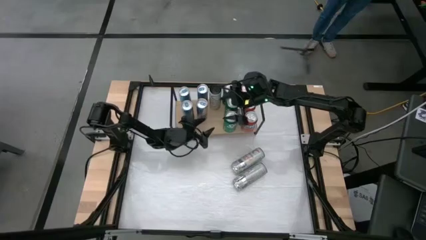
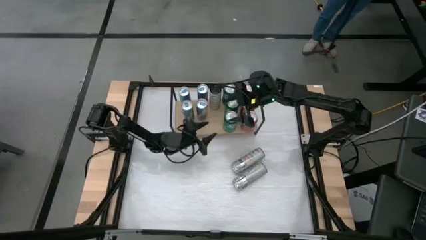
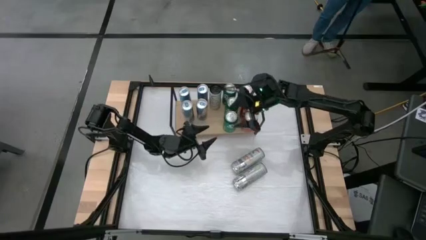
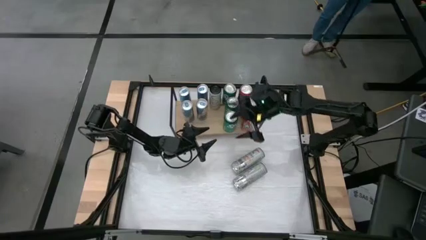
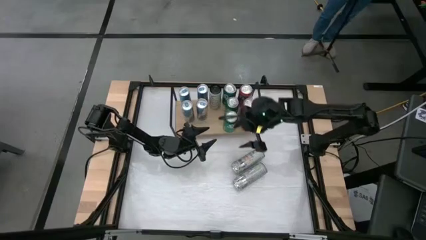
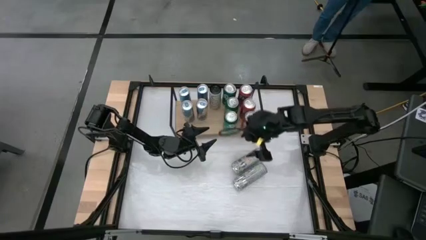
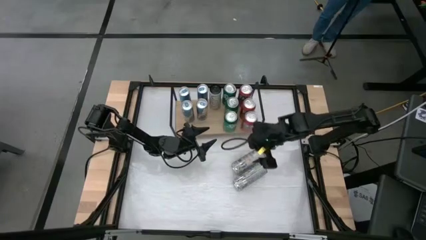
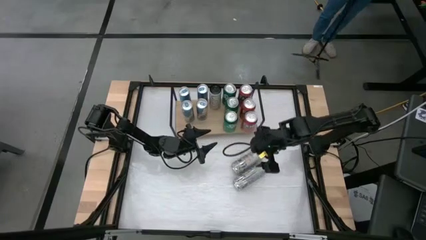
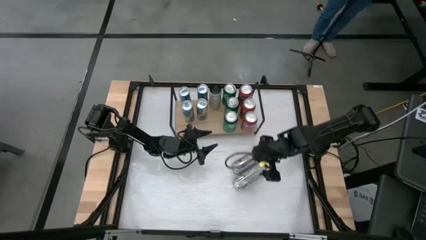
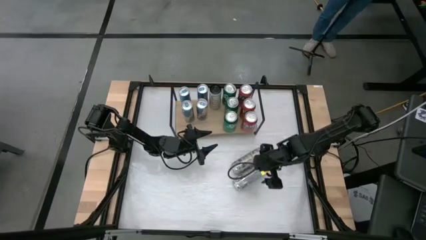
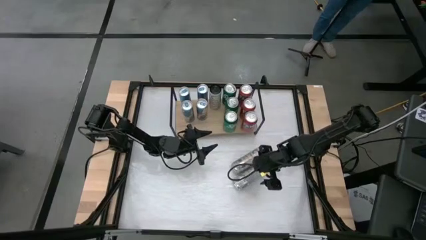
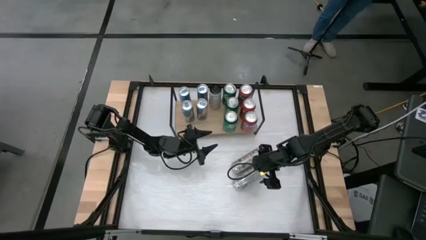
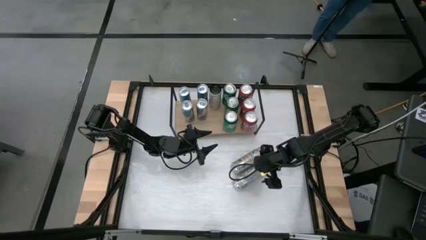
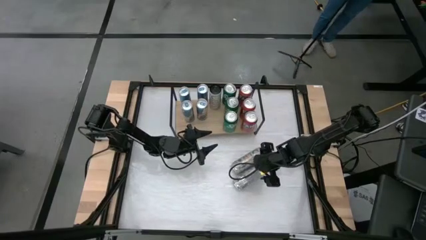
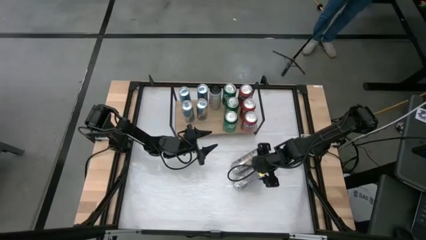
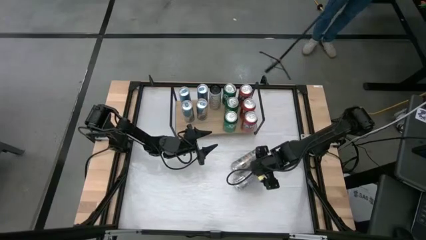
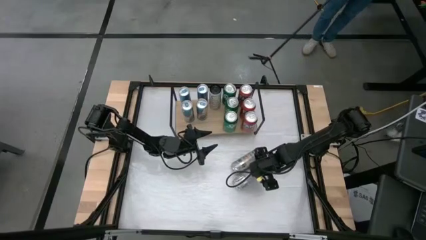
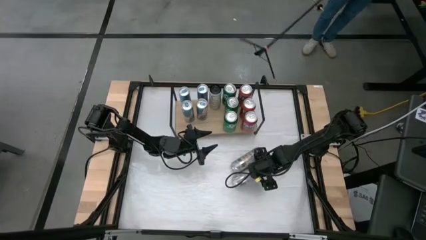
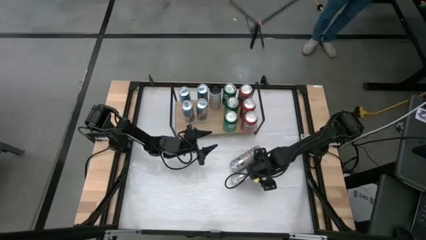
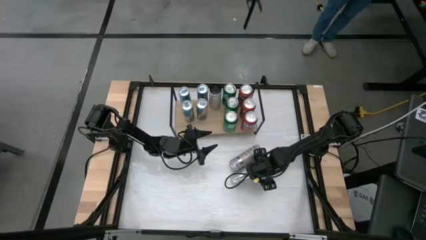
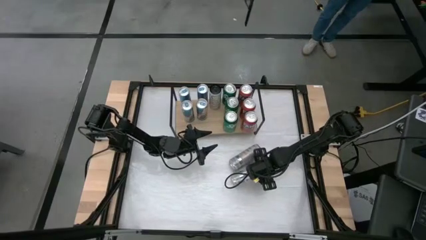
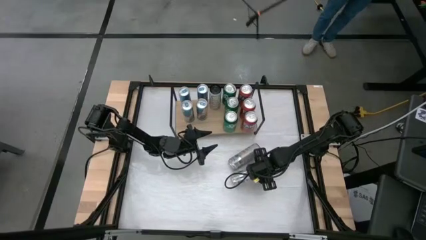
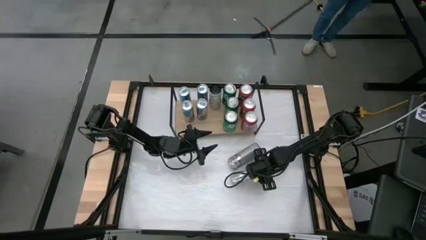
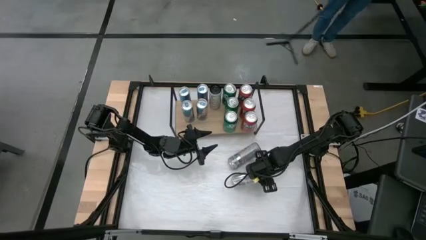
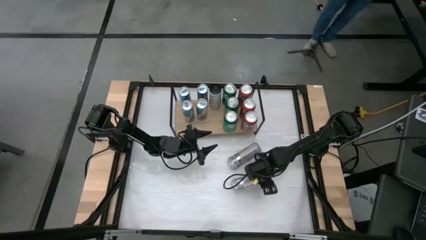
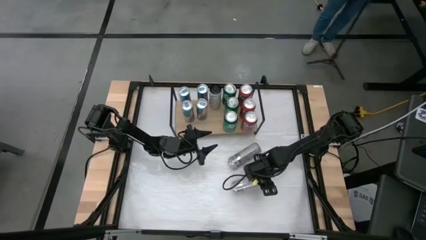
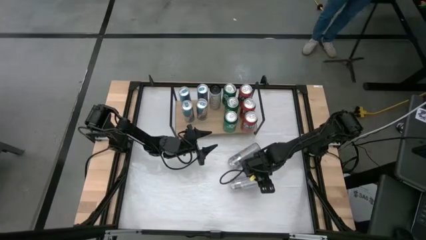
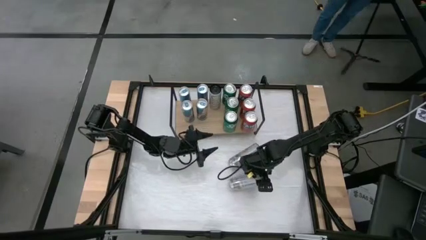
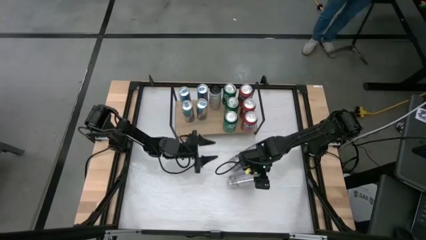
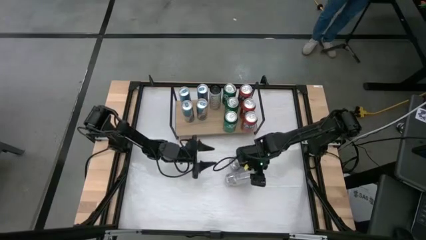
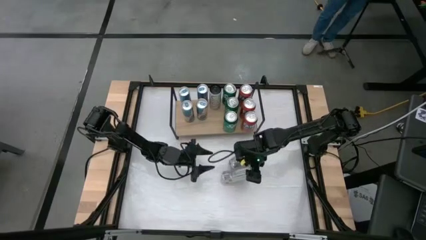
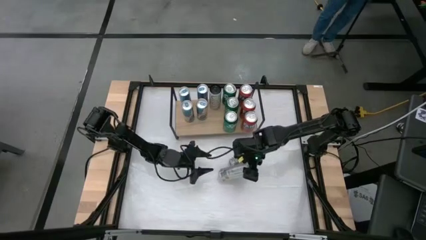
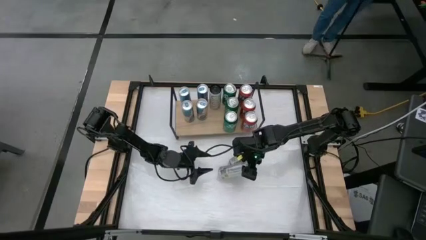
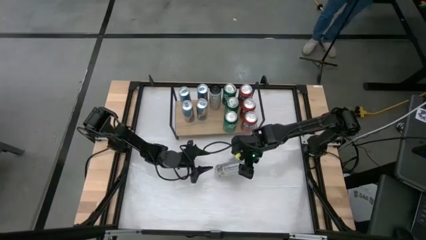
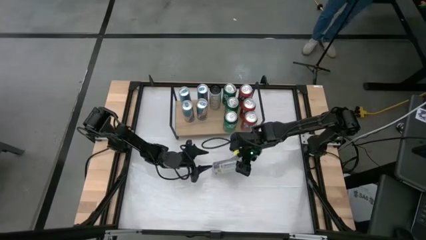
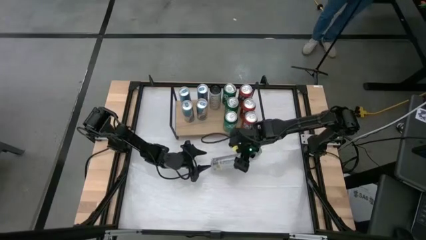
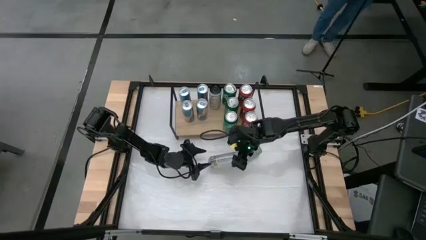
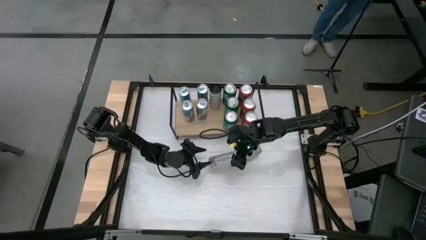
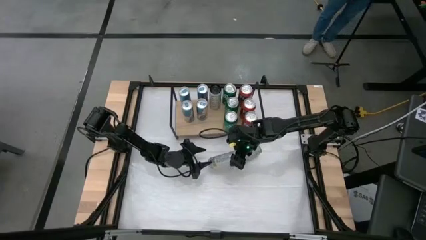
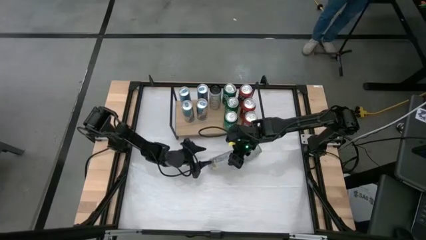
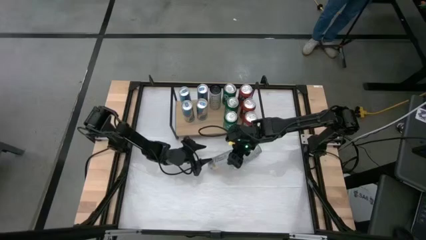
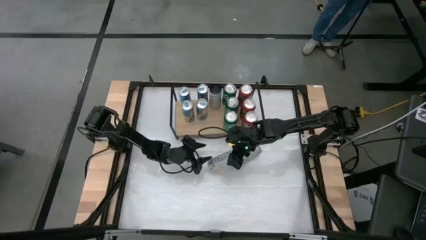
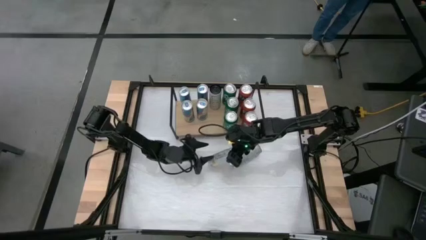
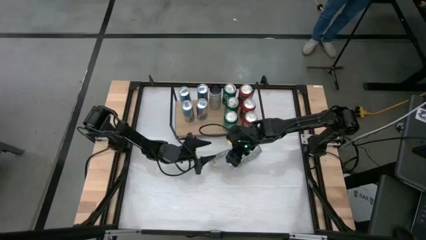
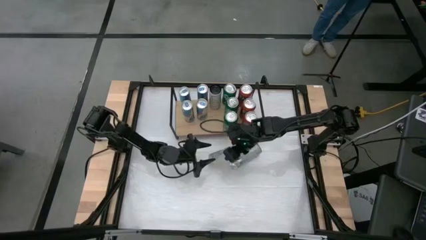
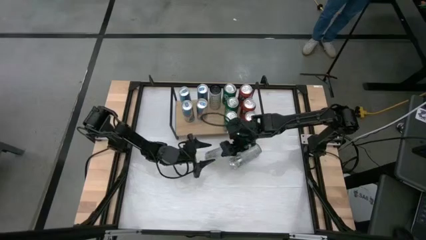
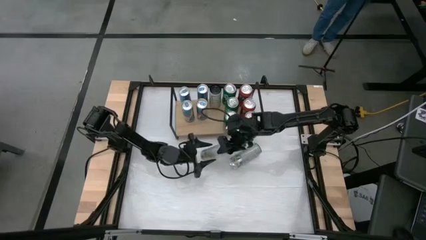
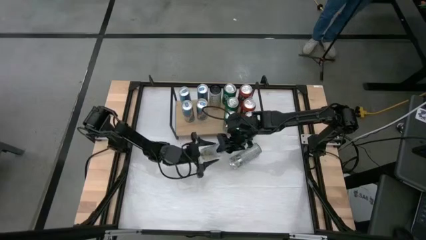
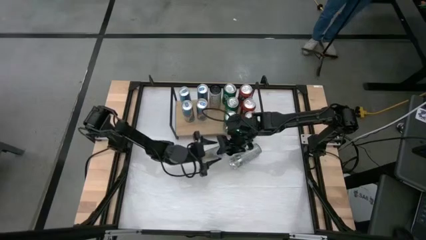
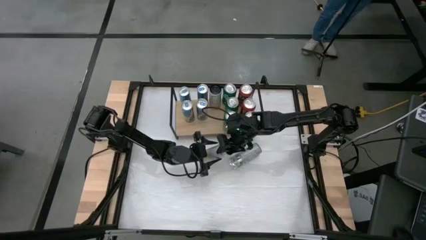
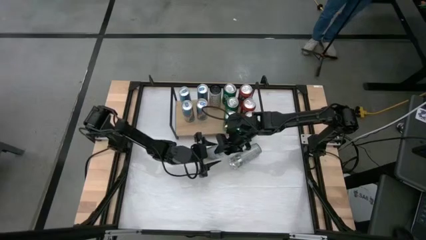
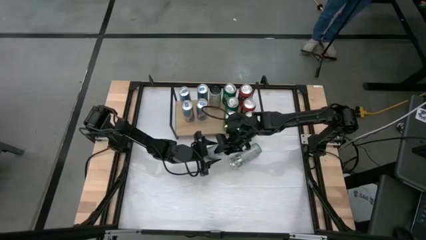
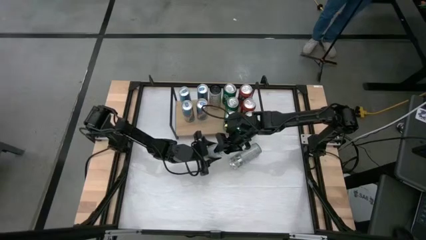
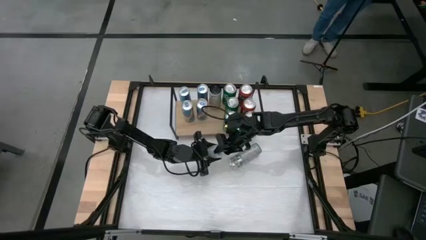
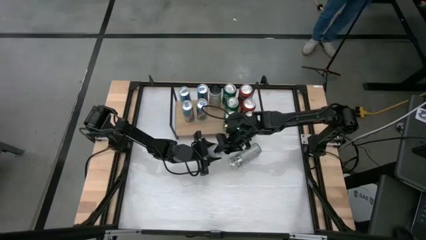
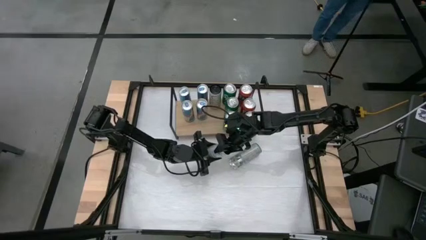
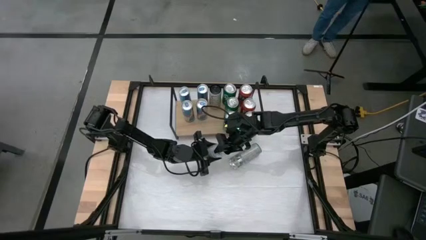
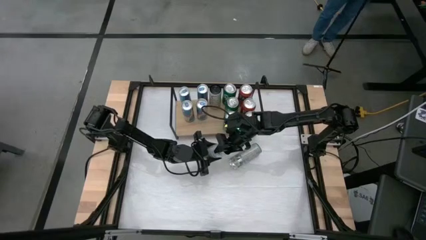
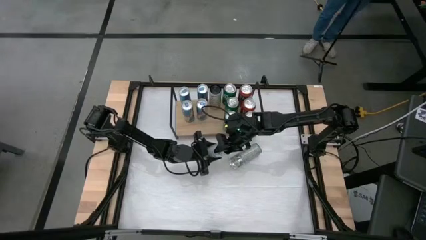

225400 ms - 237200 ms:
Task: Sort soda cans
Put the white-yellow soda can on the shelf and align with the other white-yellow soda can
